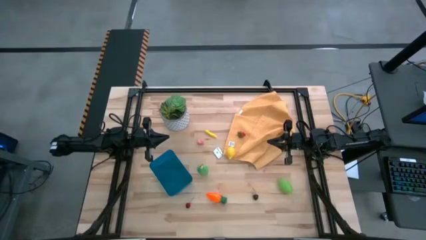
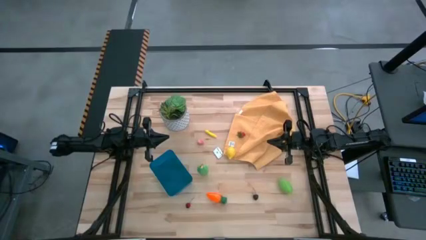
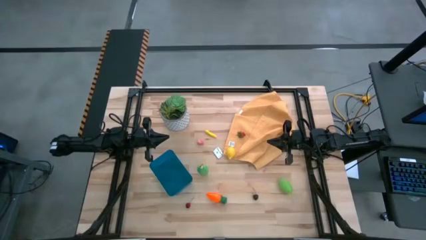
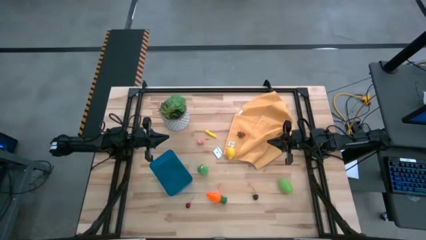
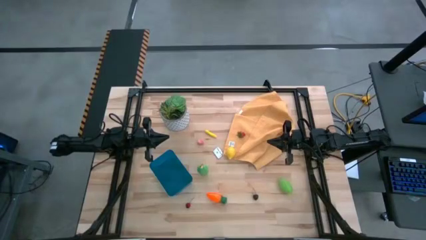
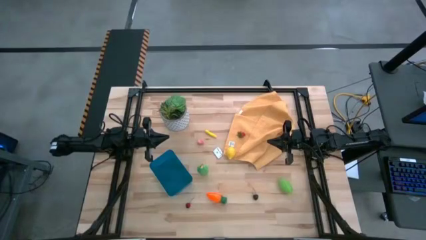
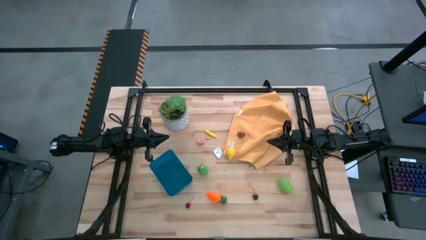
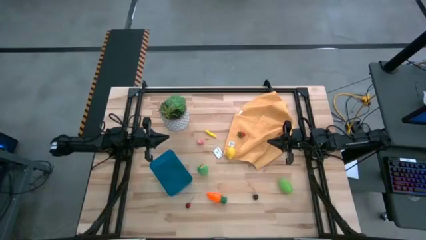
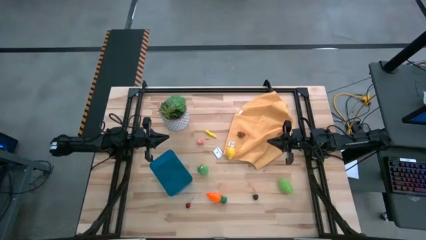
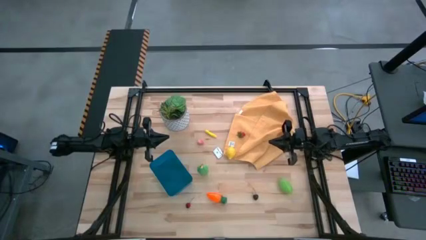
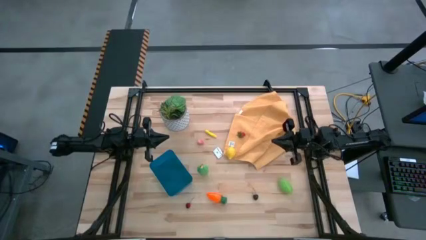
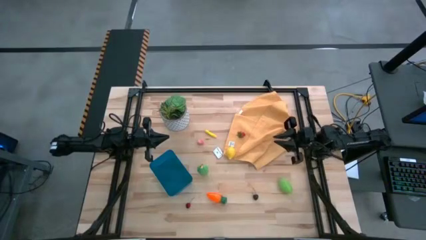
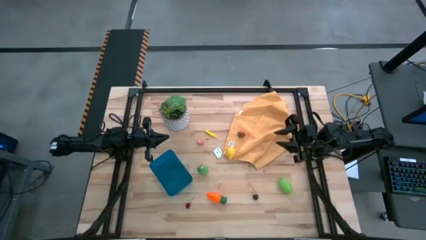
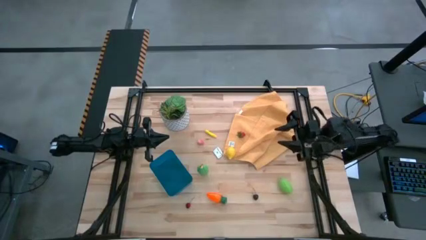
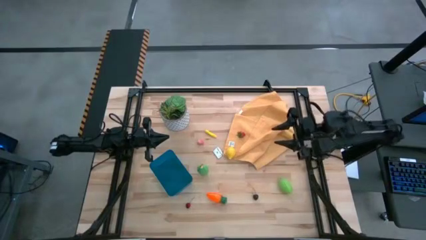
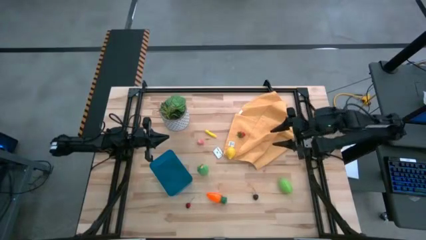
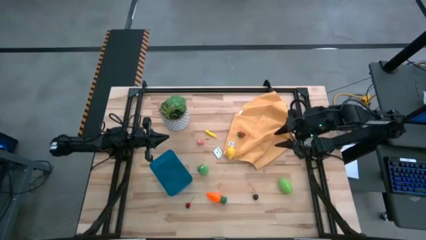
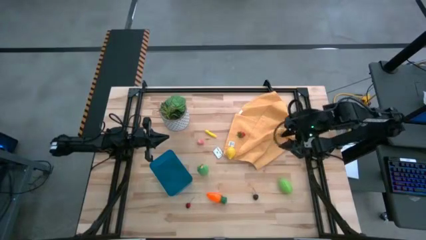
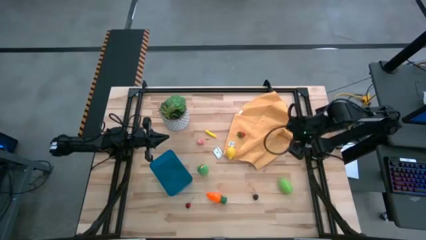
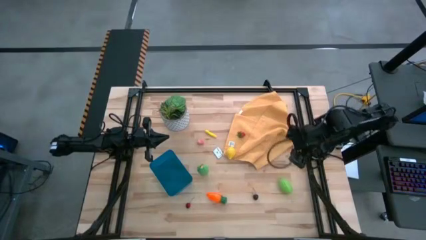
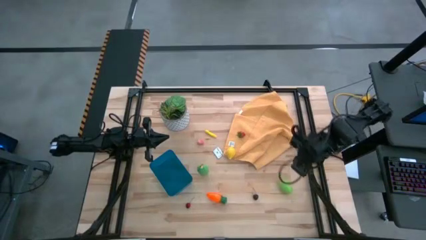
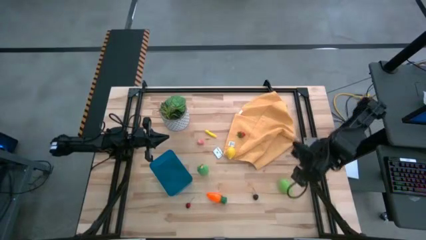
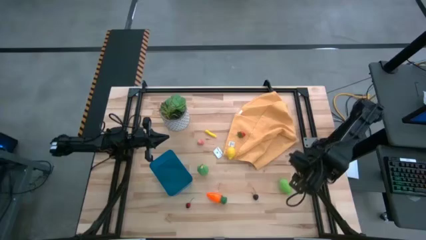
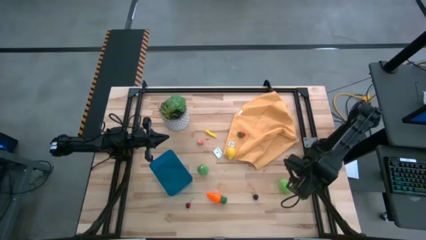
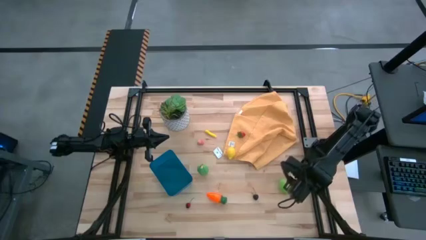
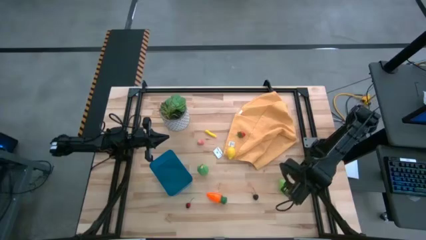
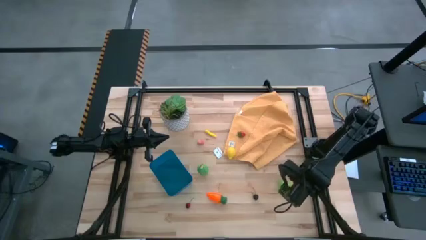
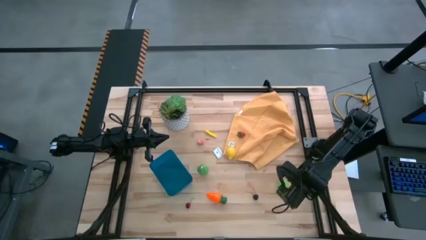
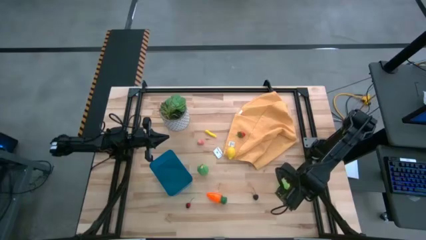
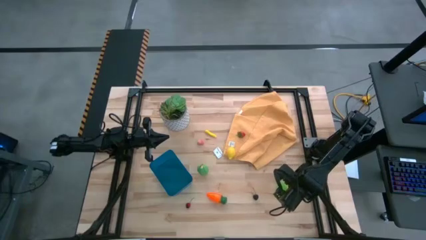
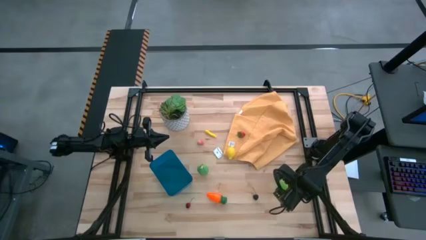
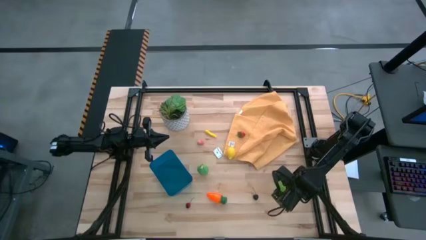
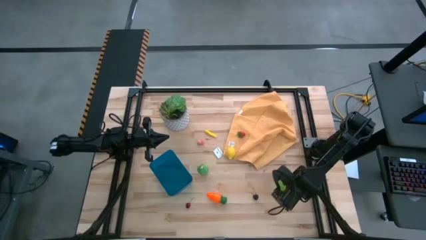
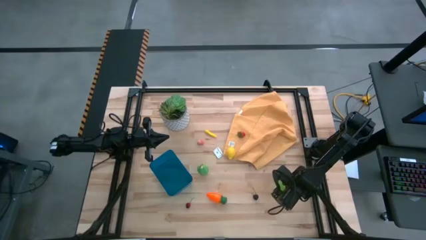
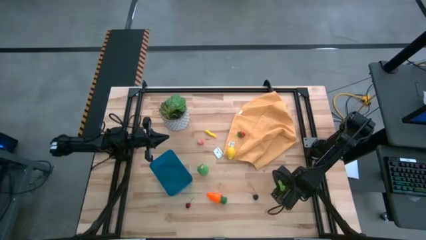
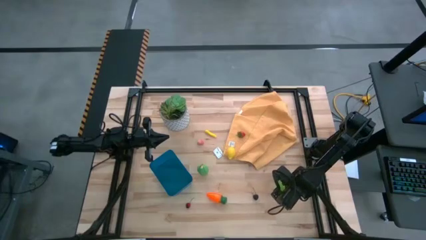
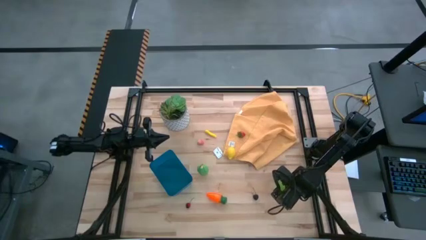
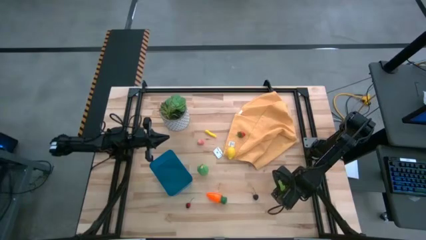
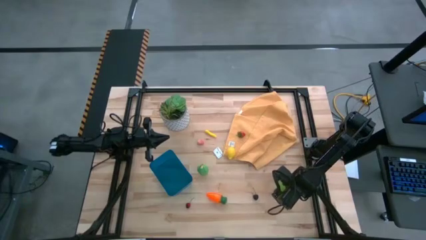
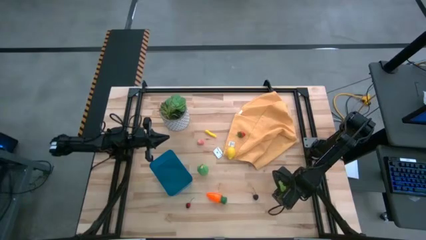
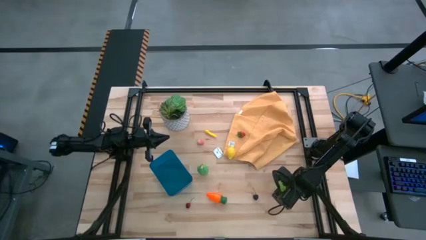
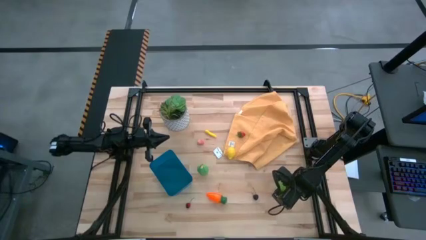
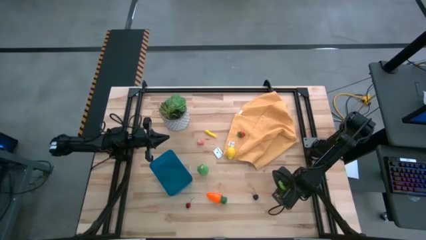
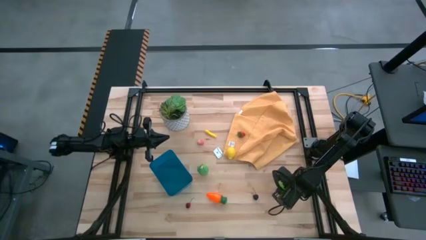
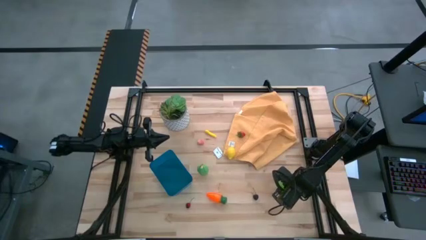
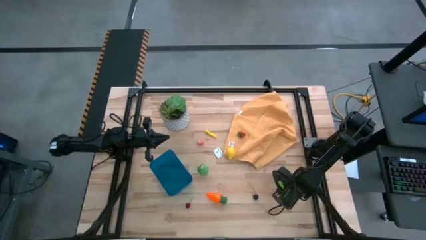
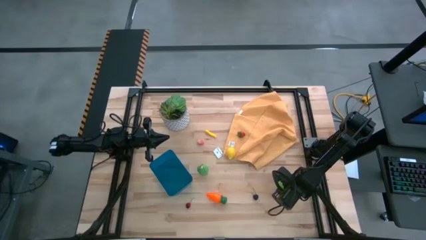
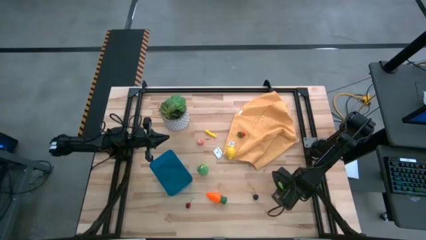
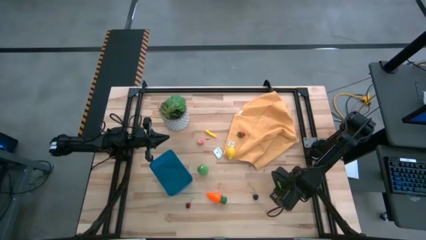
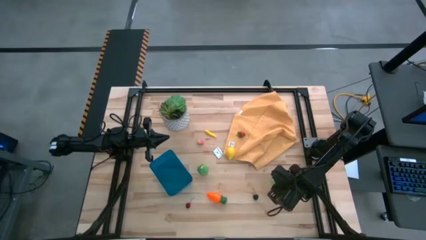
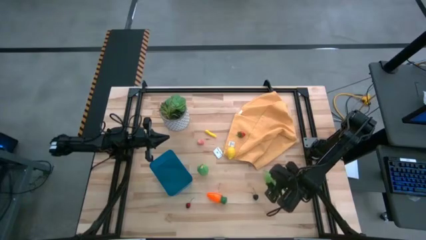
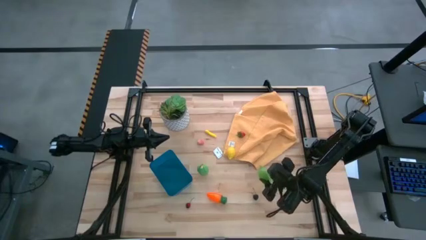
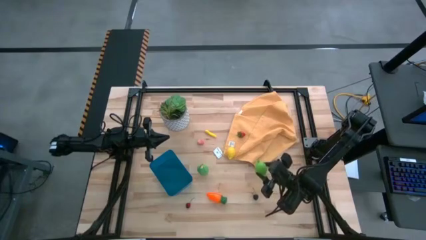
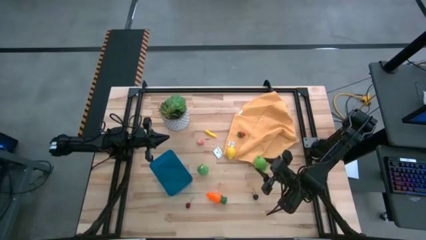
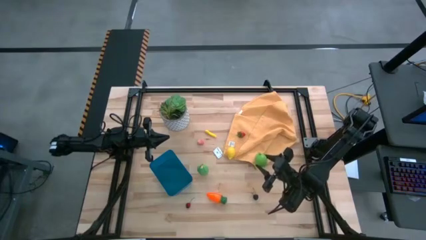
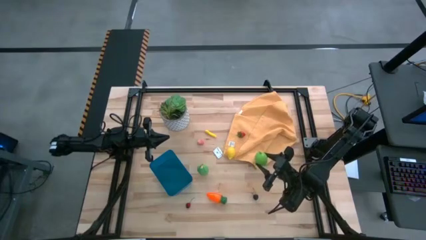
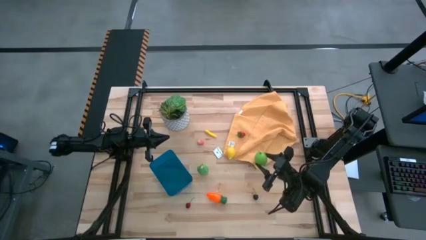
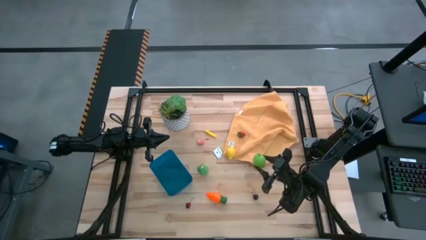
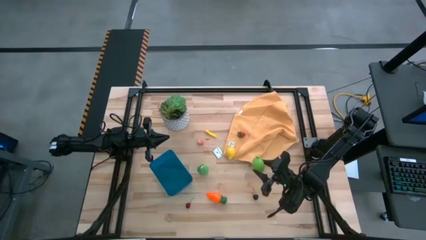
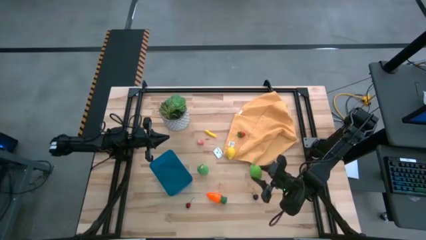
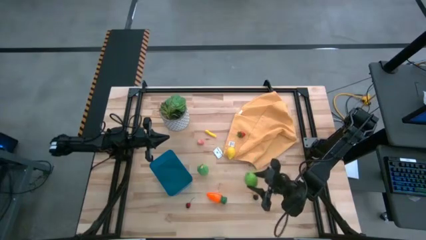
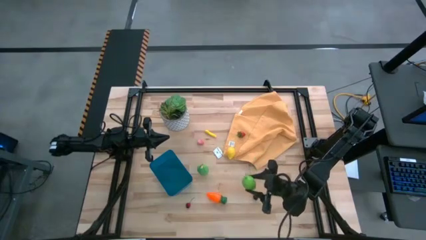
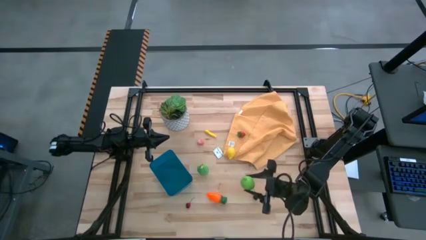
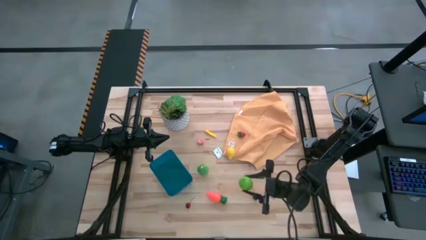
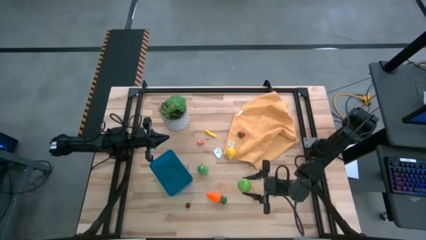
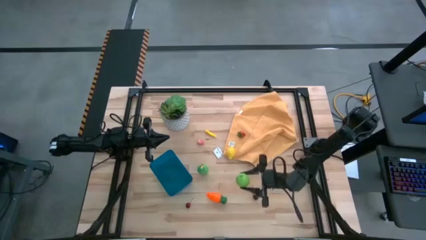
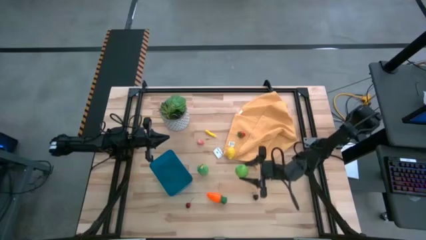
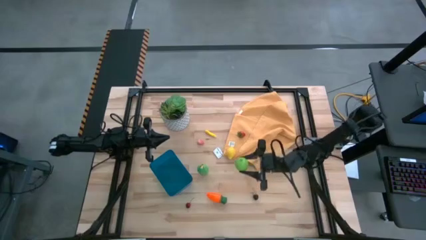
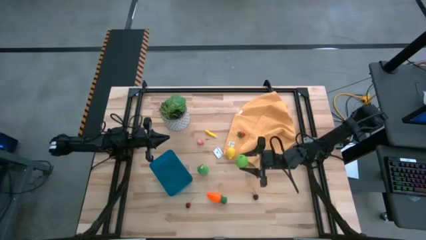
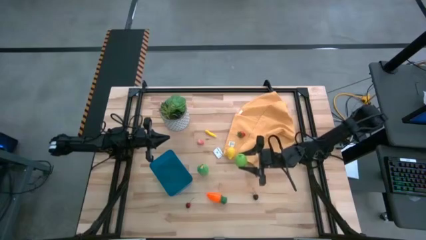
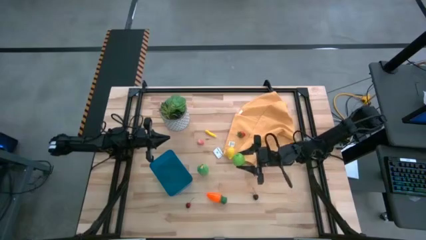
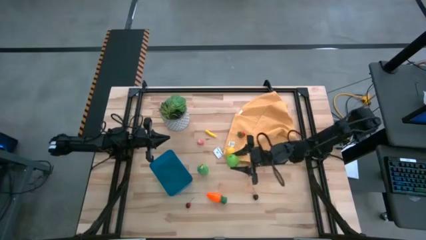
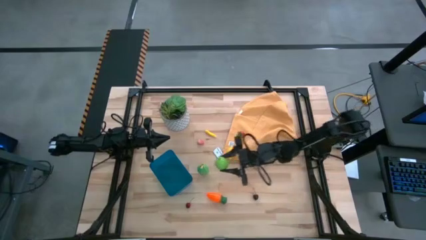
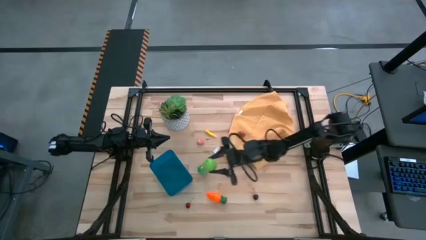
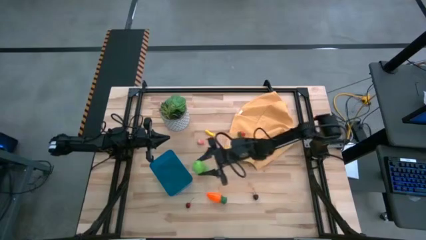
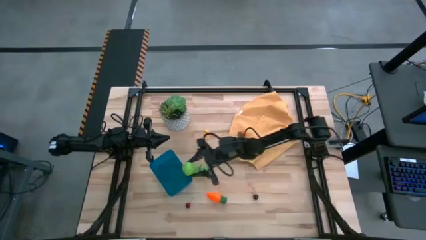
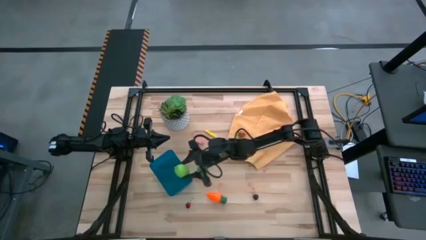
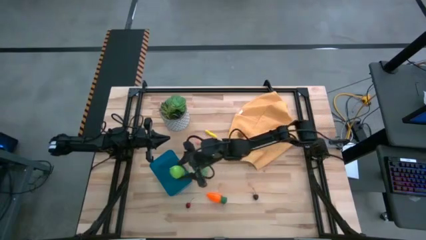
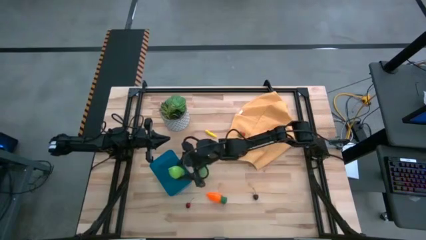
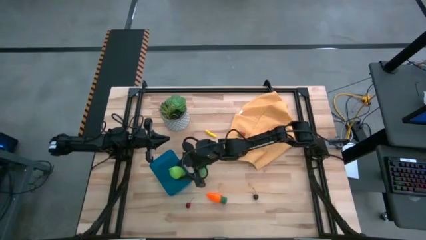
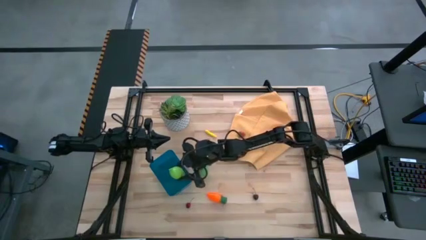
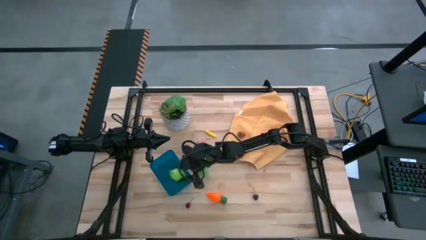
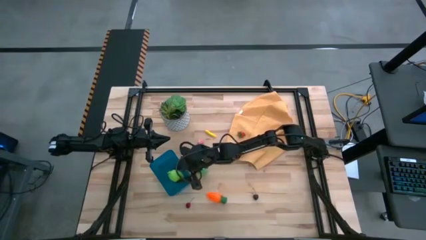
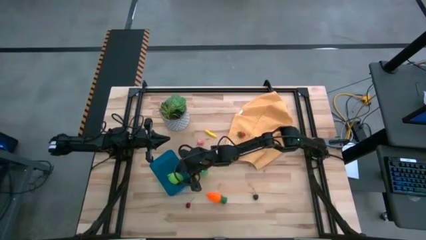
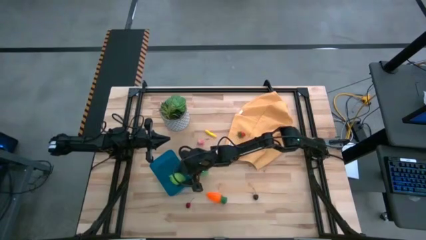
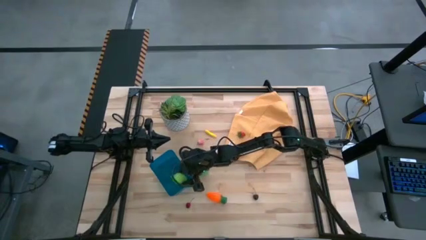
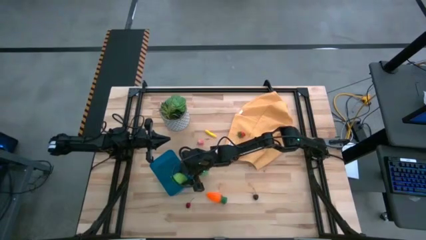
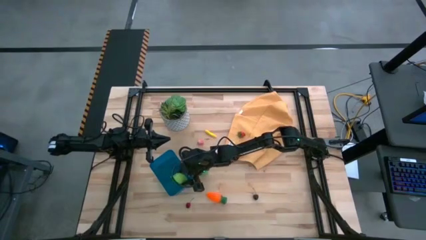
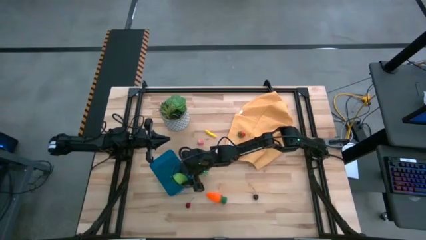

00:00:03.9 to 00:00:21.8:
Task: Pick and placing Produce into tupperware
Put the green melon into the blue bin
